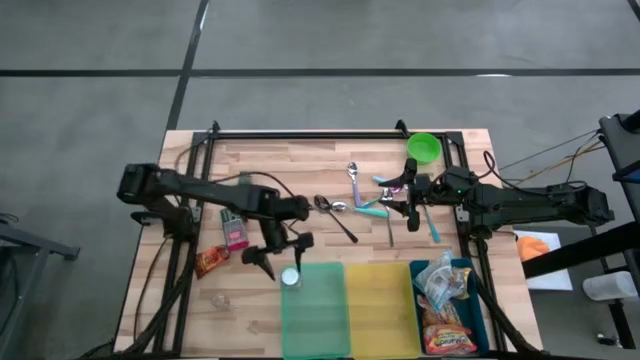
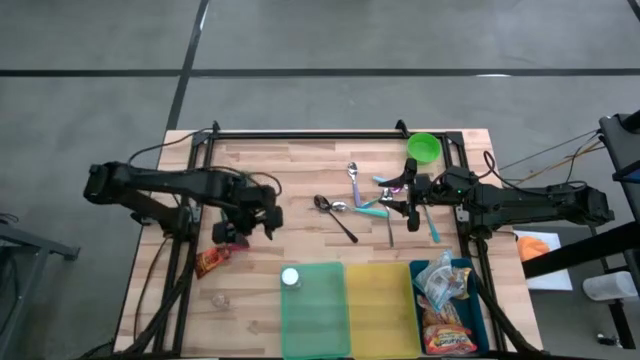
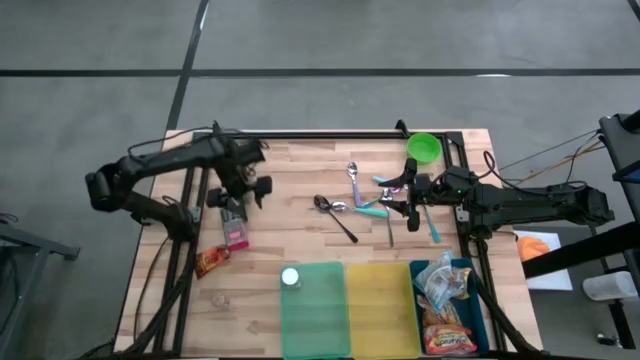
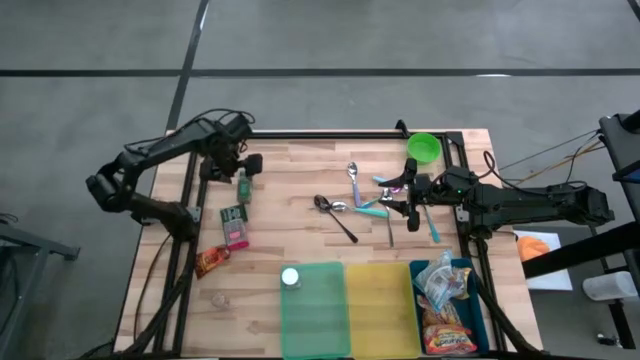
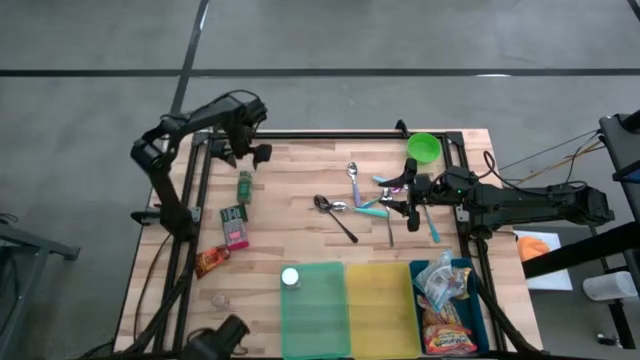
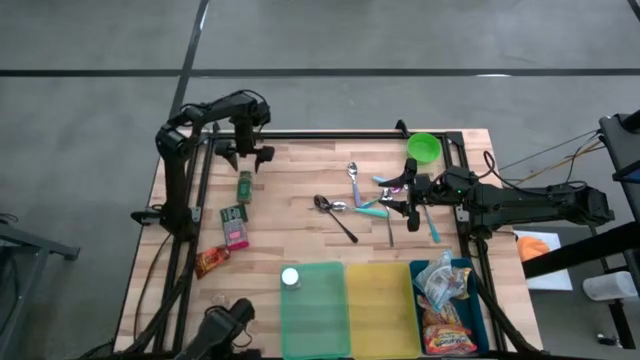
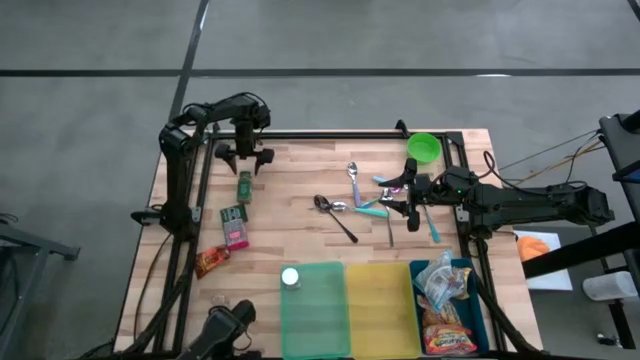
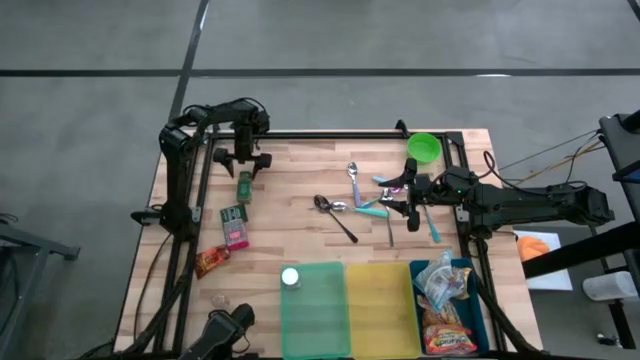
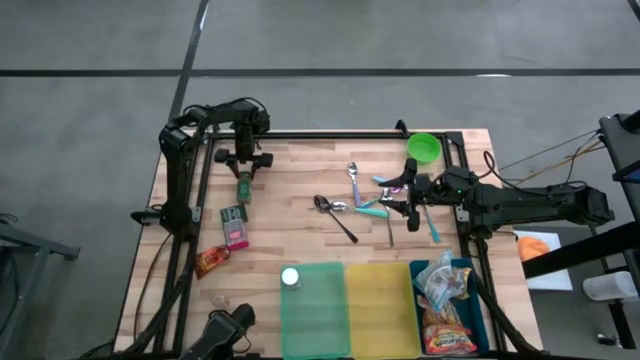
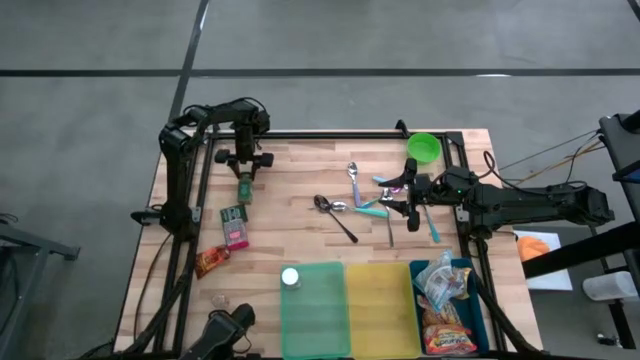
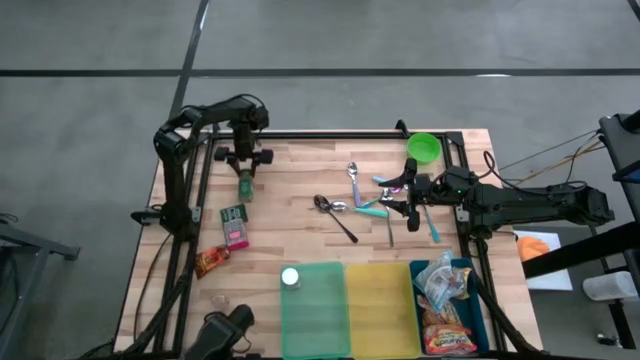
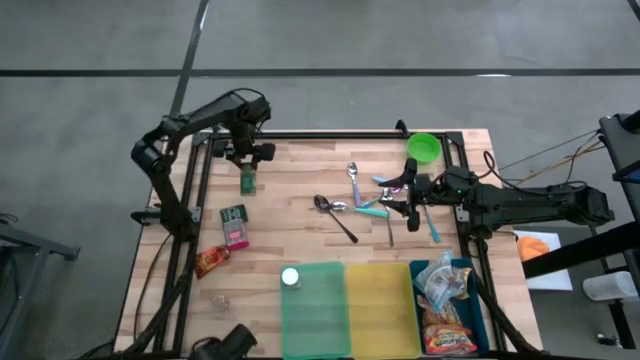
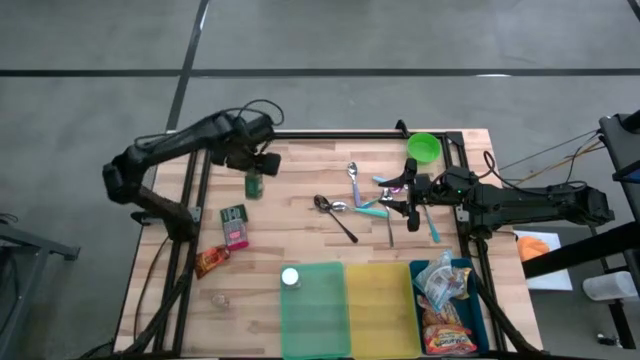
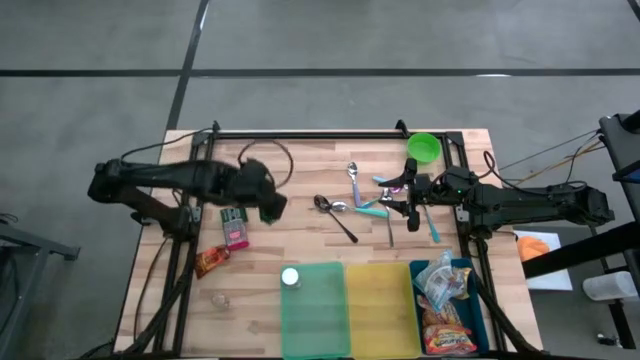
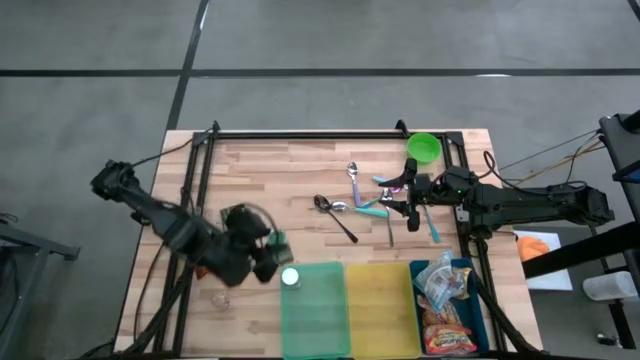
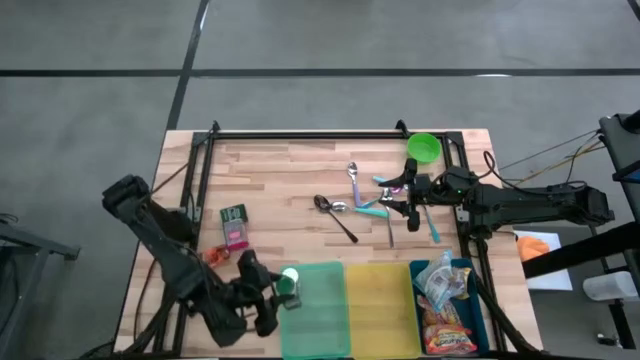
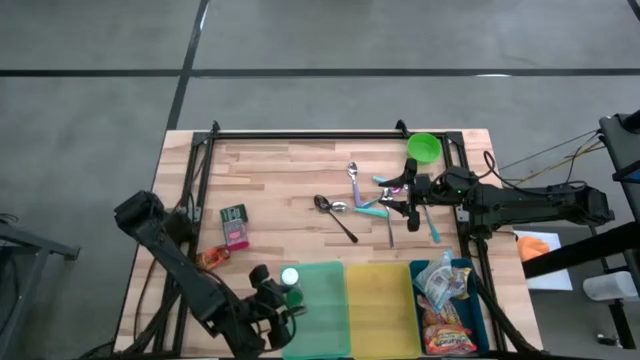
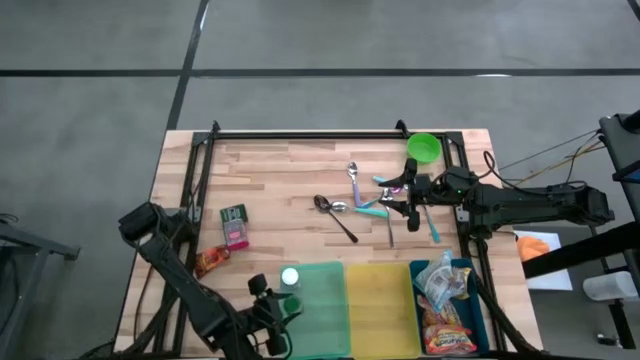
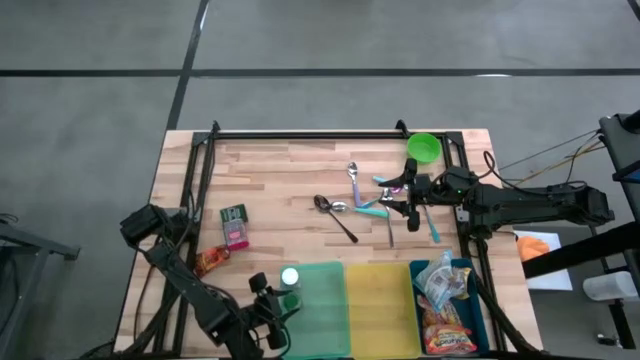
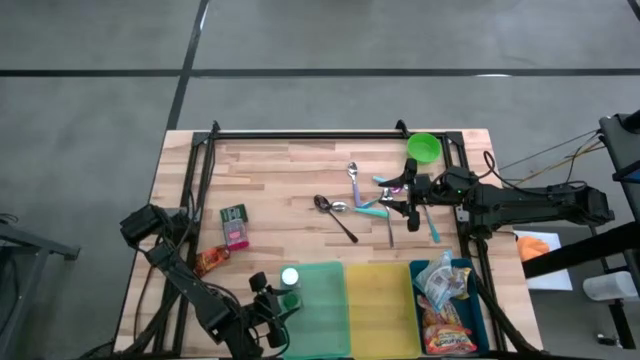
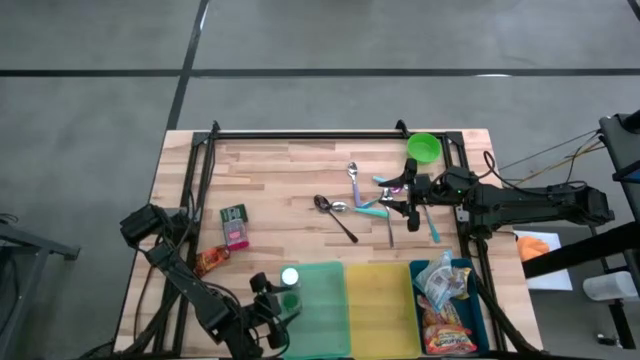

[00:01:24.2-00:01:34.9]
Put the green seasoning bottle into the green bin

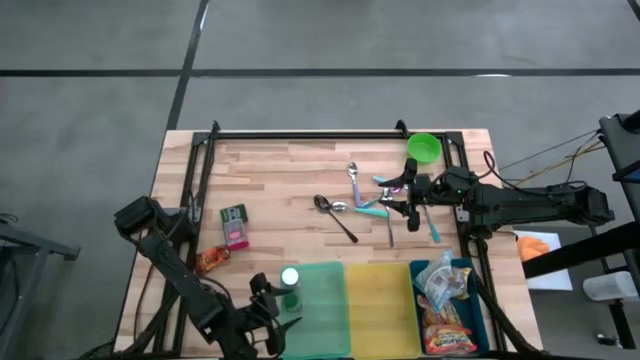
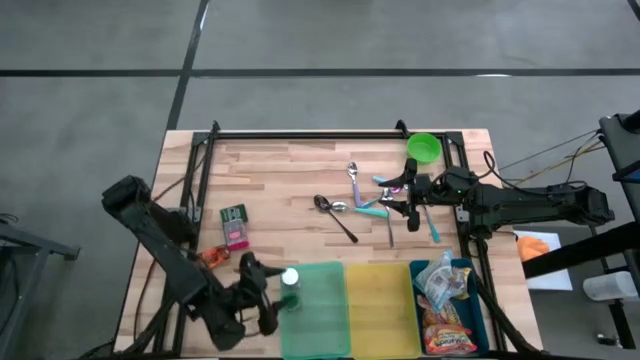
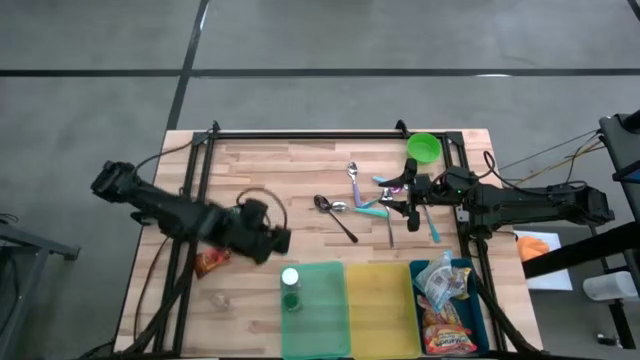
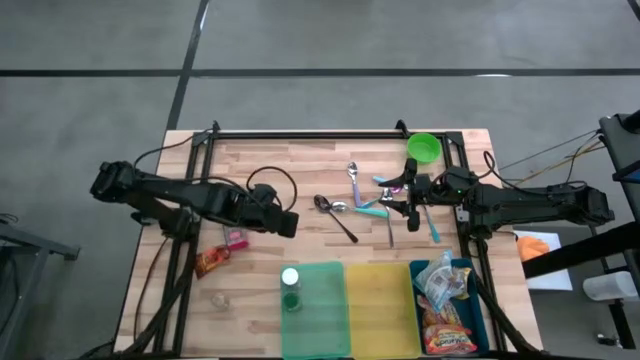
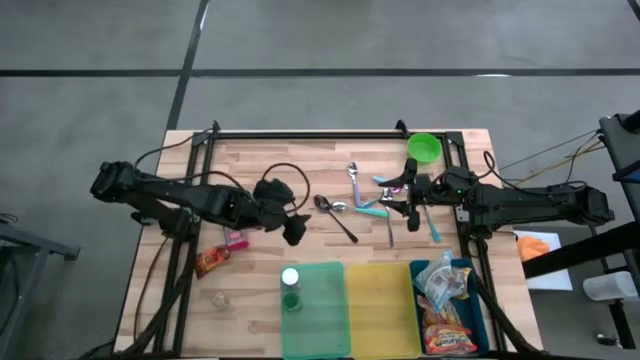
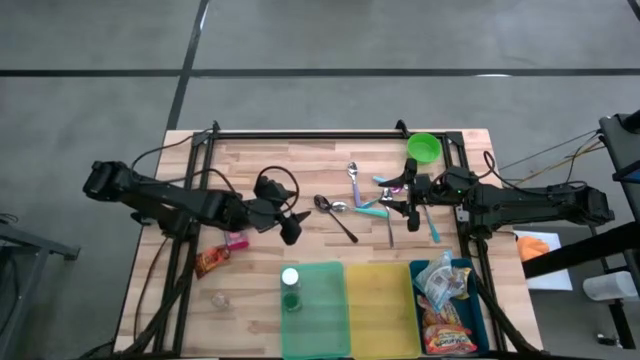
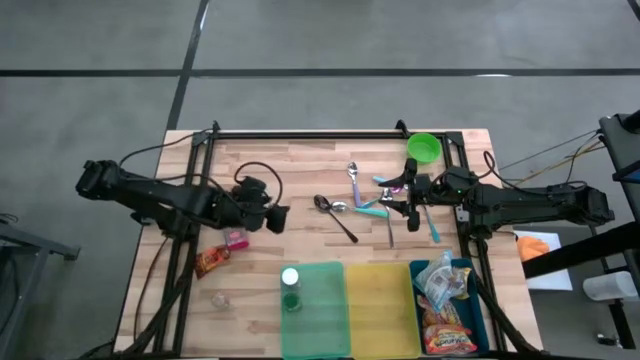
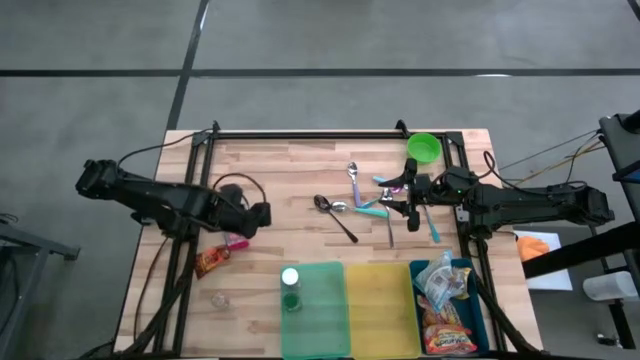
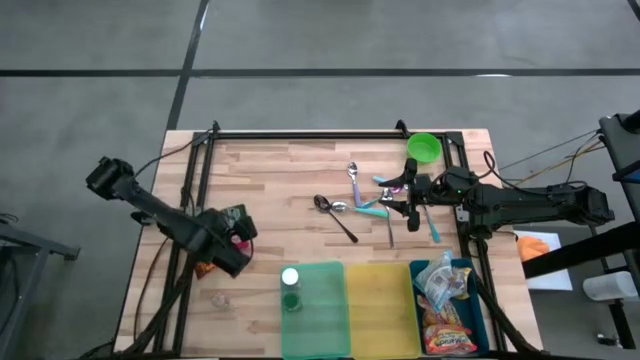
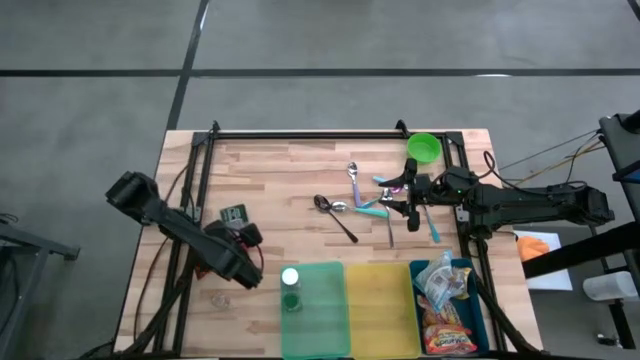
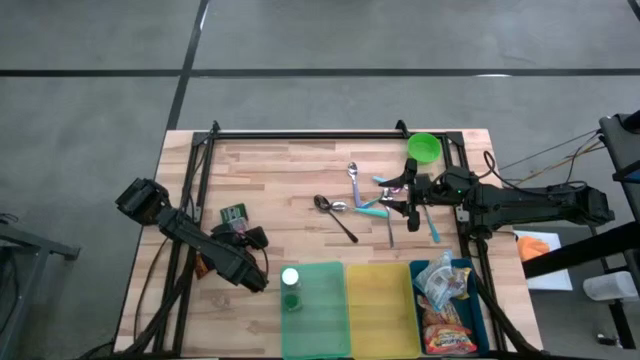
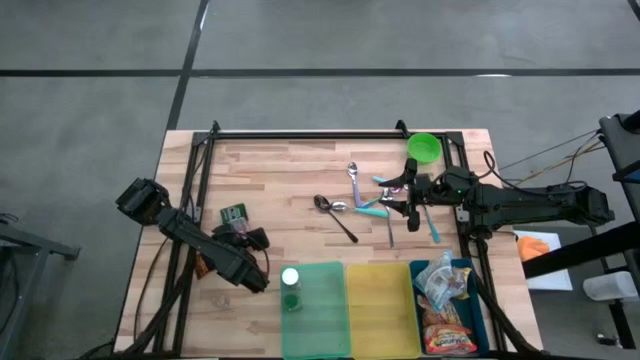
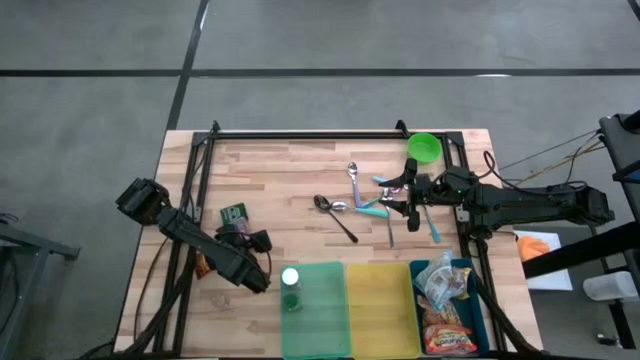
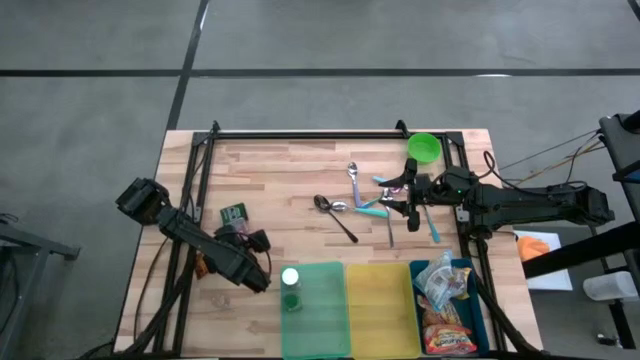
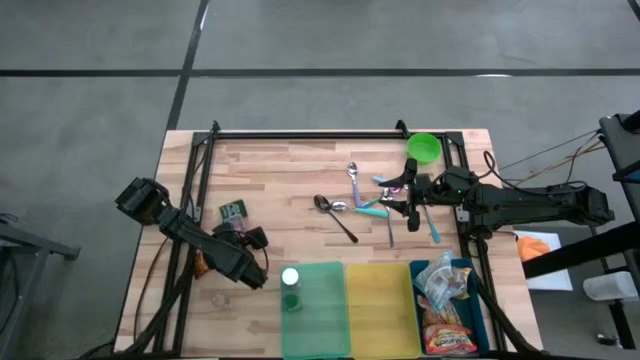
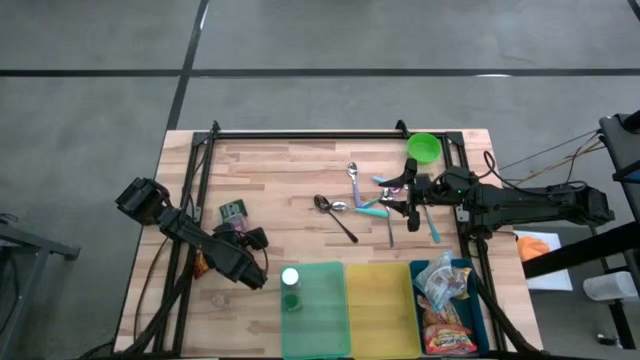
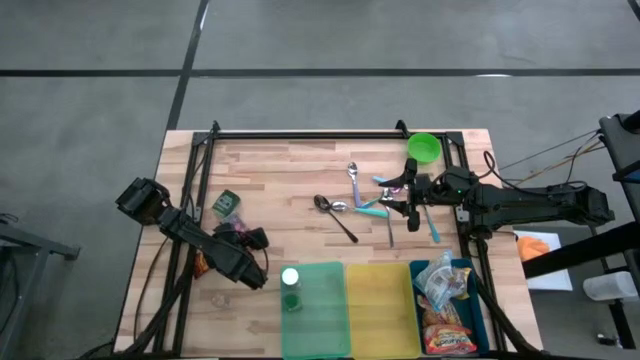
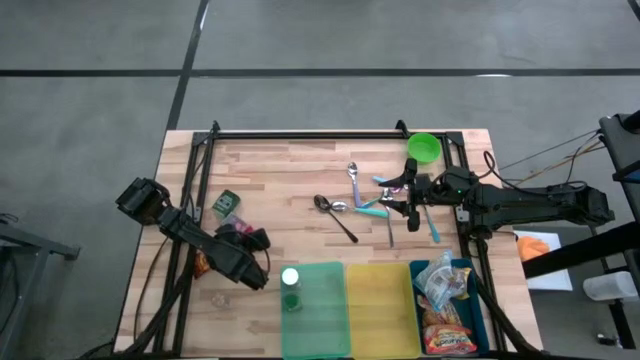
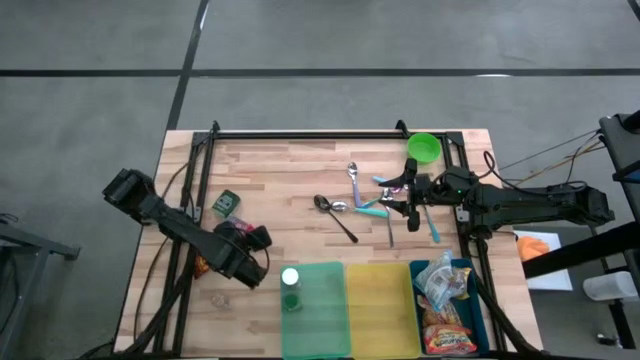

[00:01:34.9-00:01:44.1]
Put the red seasoning can into the green bin
